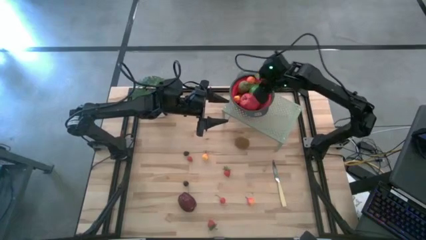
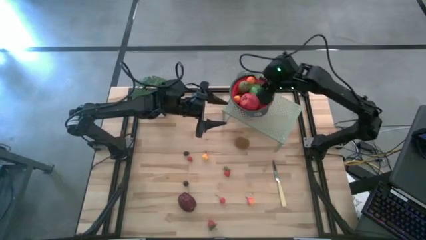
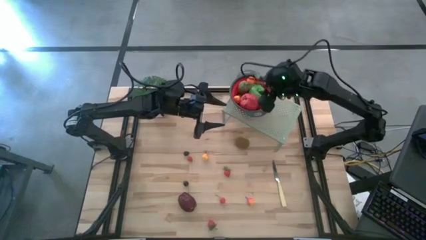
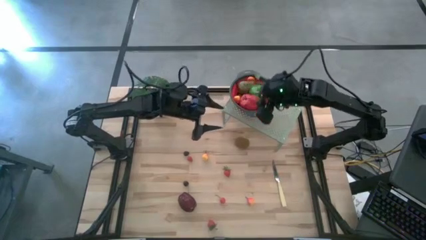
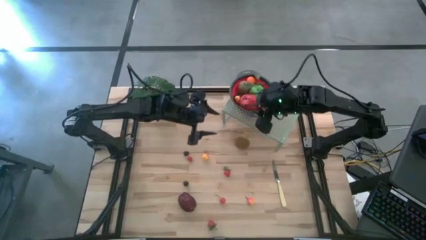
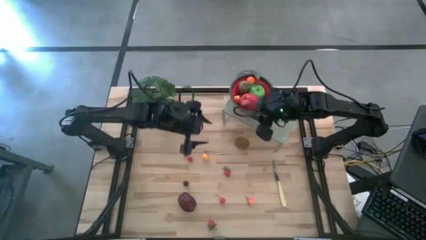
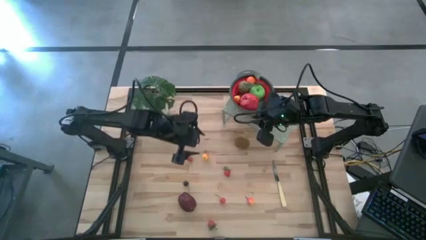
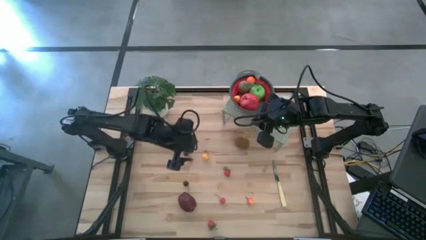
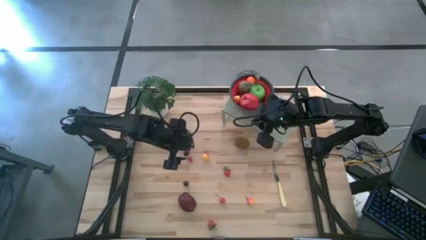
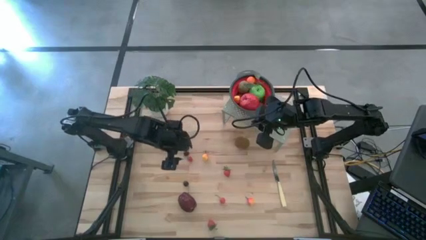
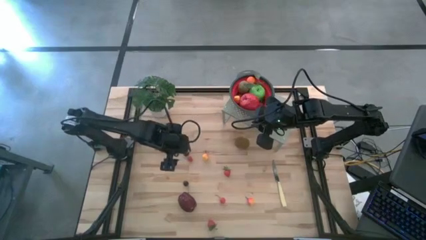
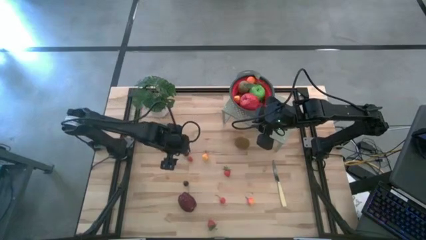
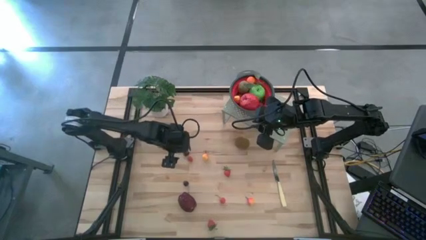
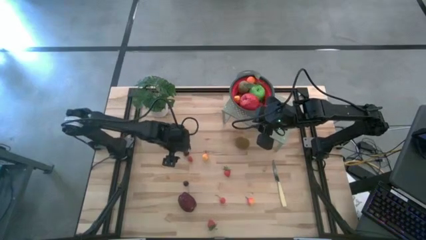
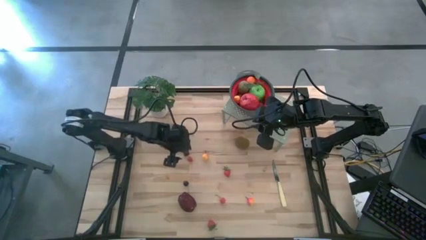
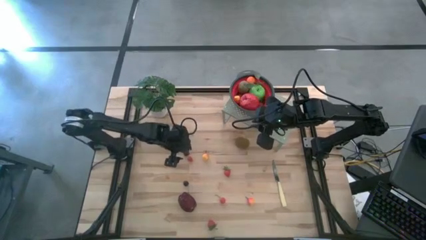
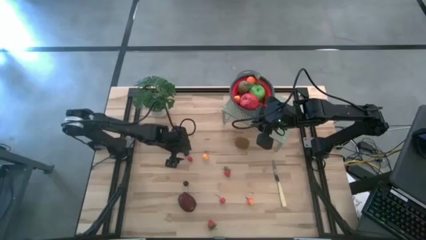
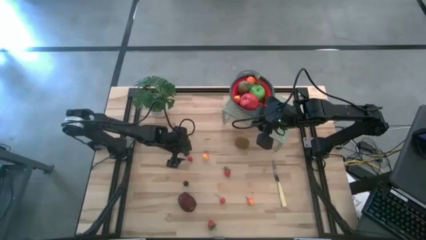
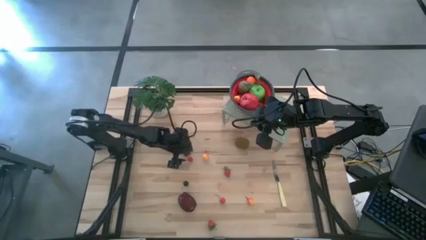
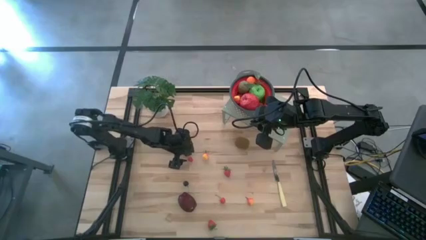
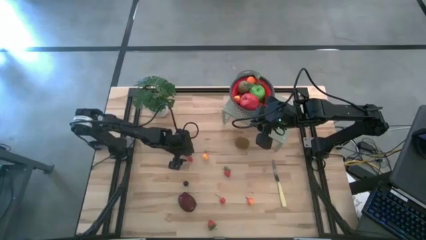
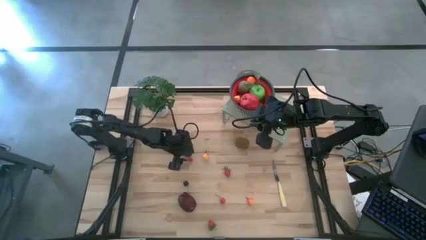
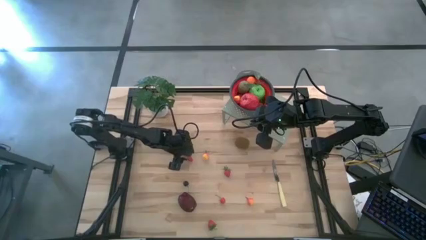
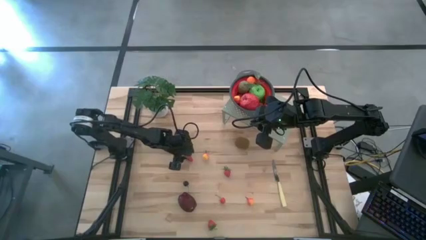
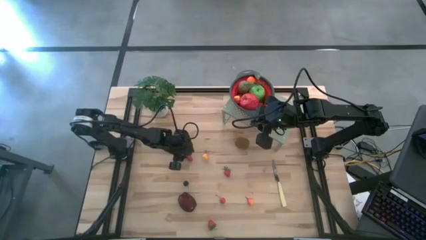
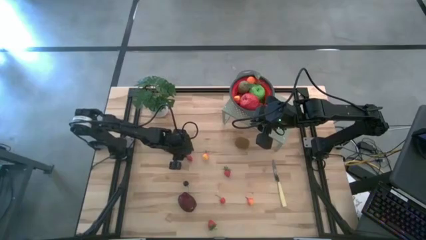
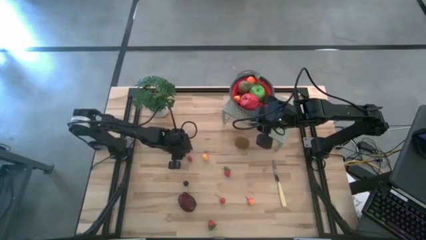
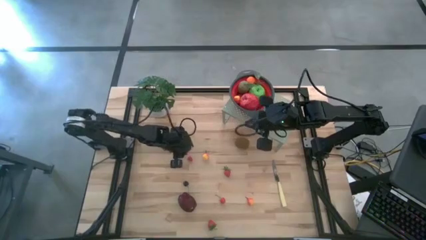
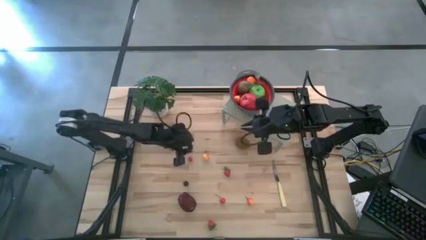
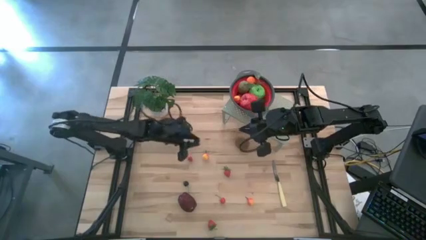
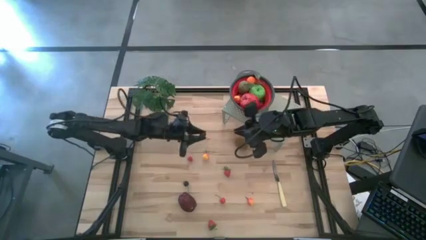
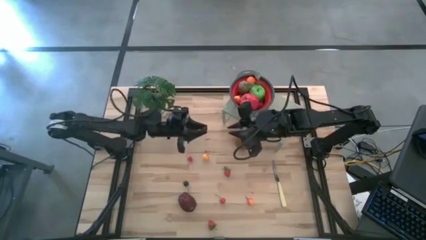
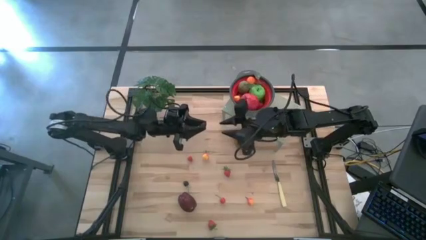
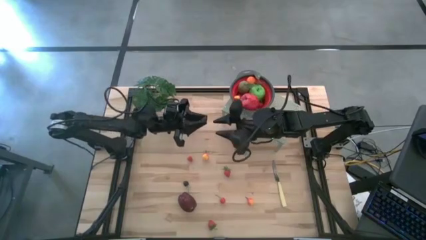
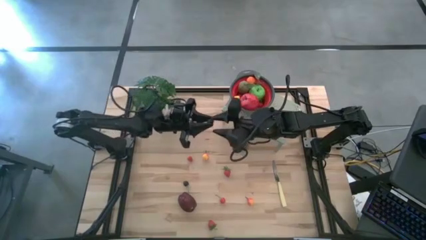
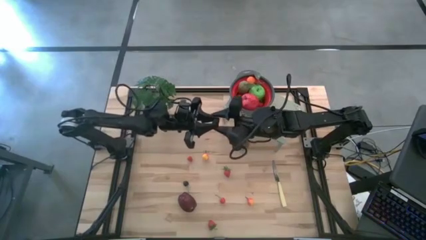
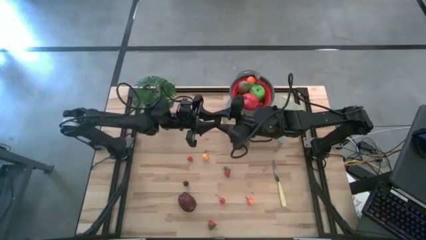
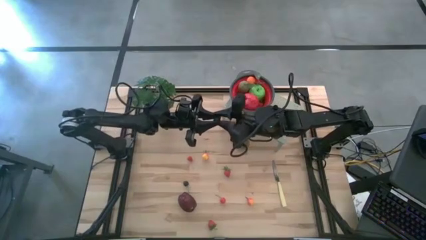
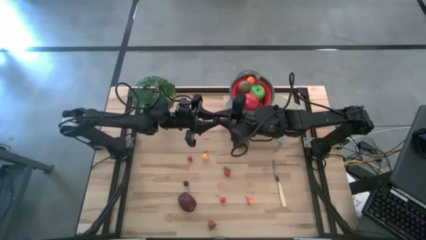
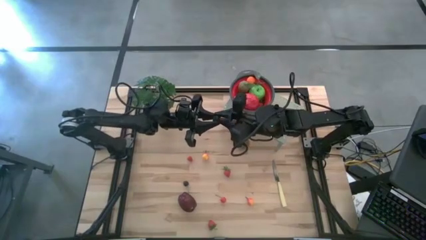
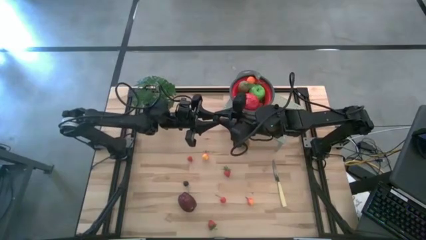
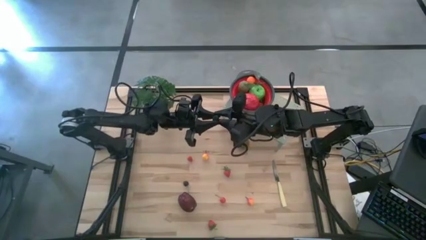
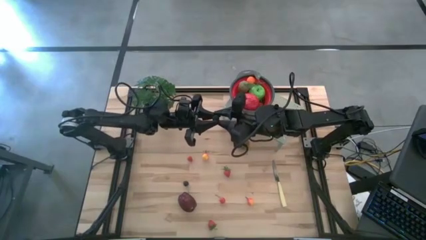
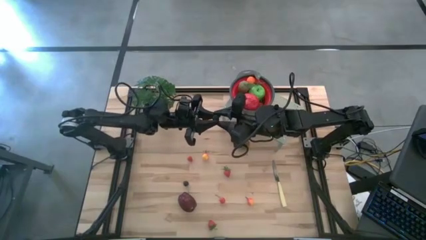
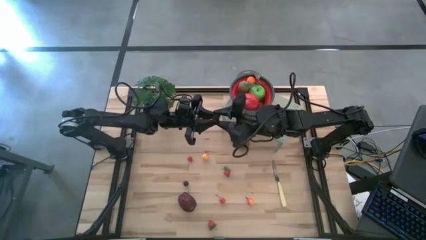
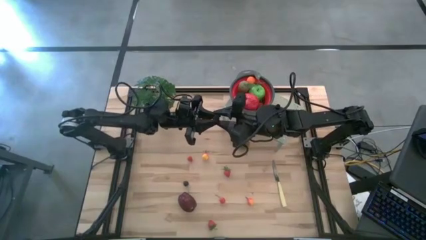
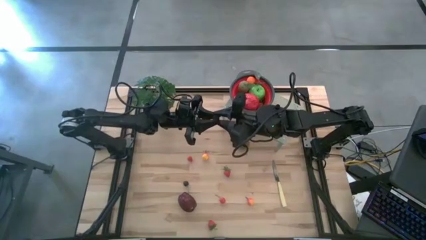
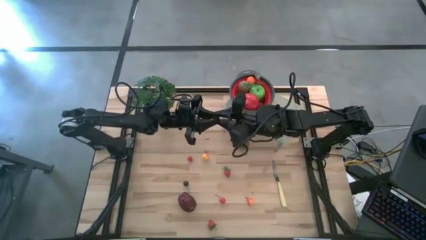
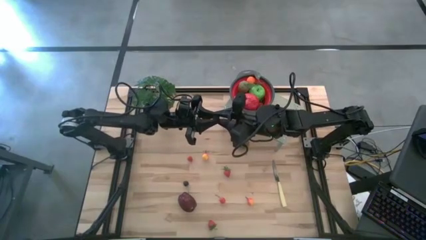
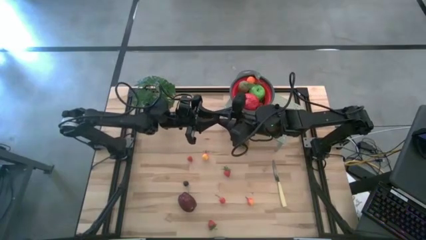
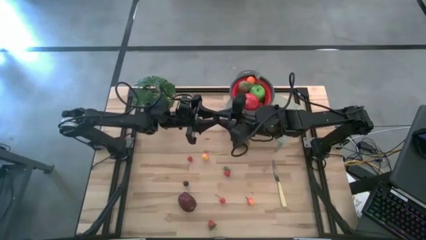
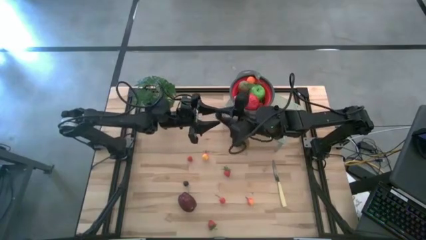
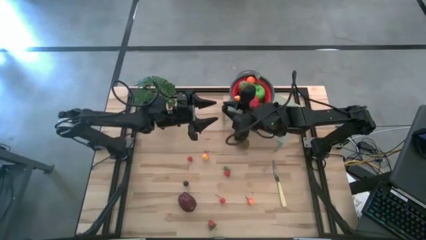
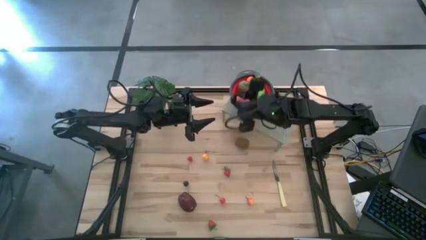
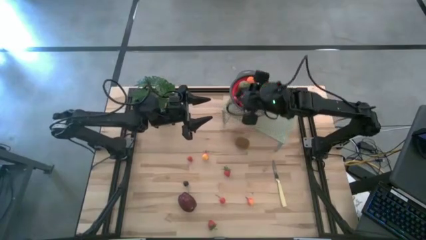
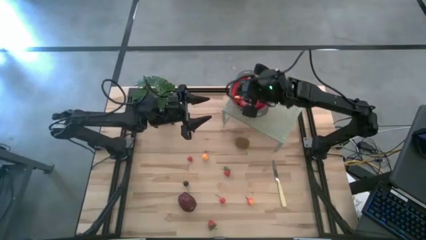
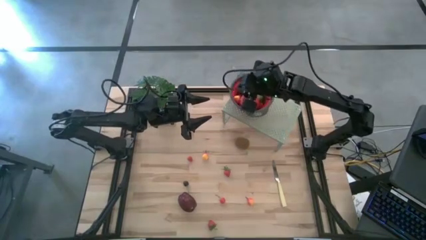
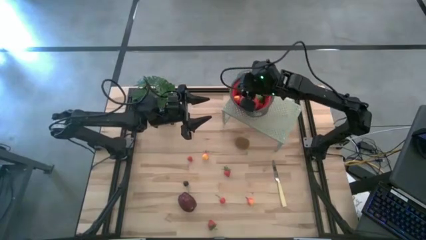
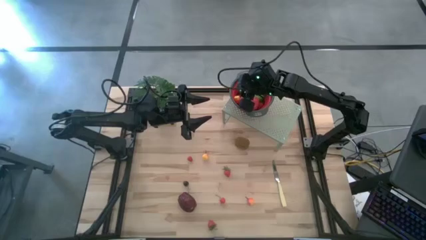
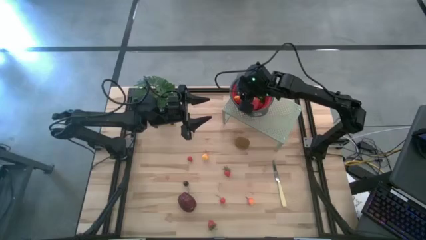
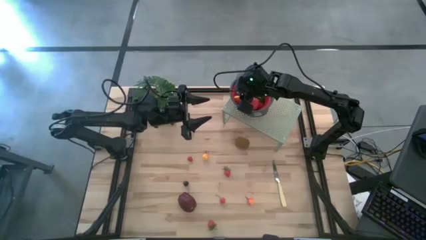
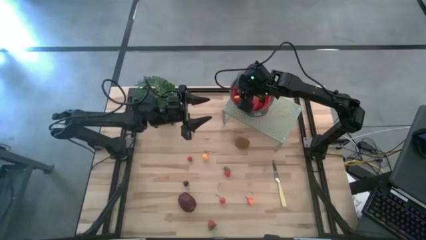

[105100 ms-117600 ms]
Task: Pick & Place Fruit
Put the dark purple blackberry into the red strainer bowl

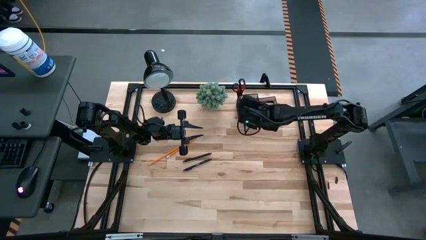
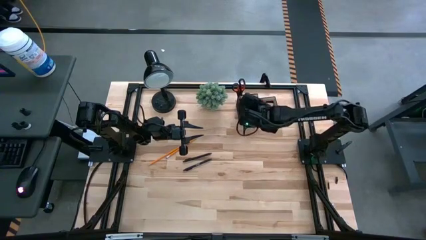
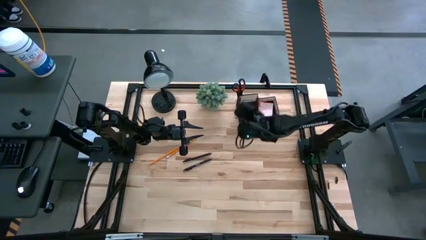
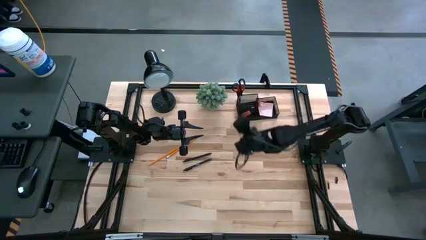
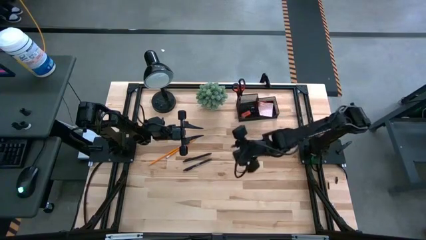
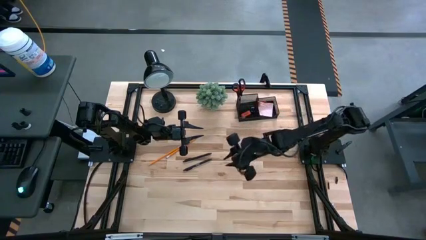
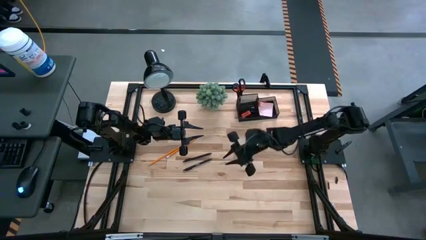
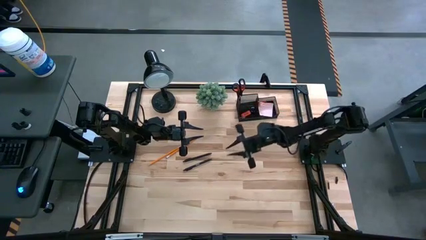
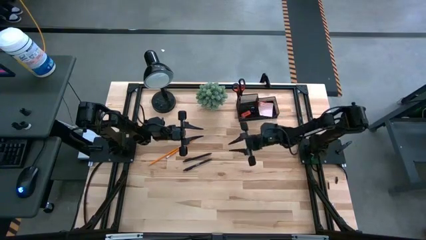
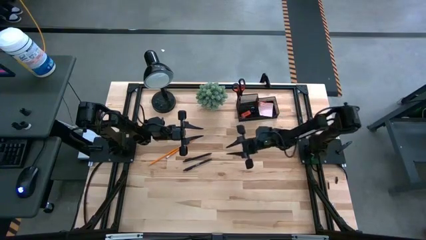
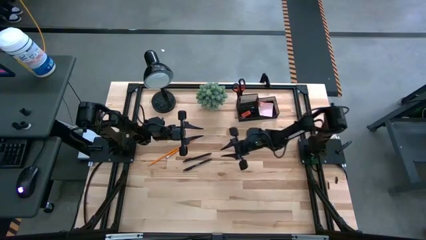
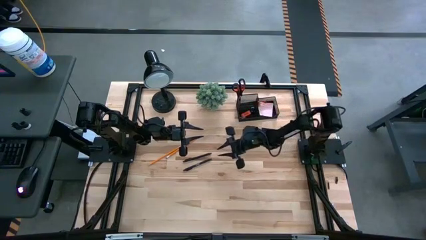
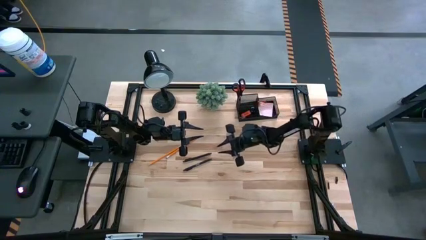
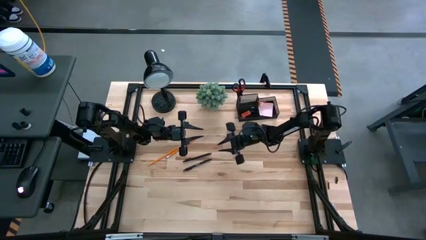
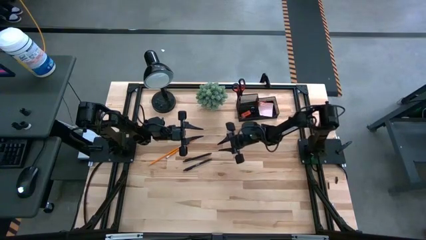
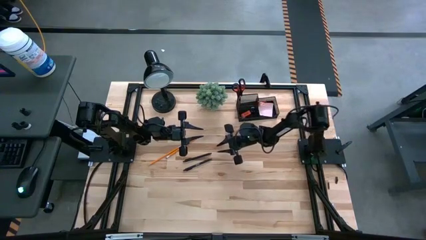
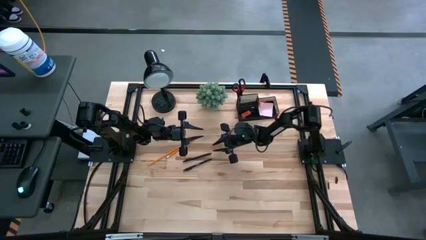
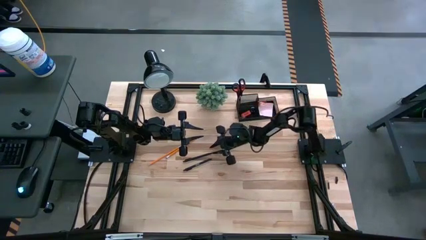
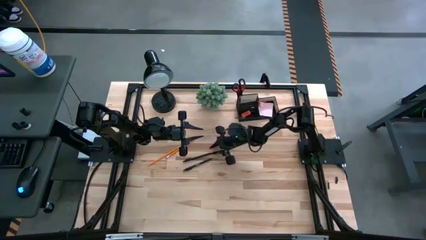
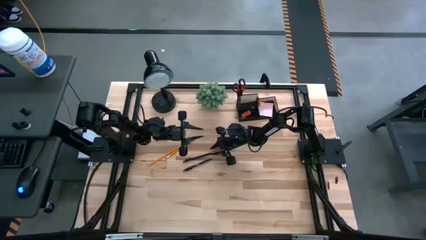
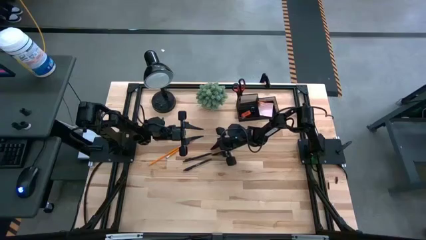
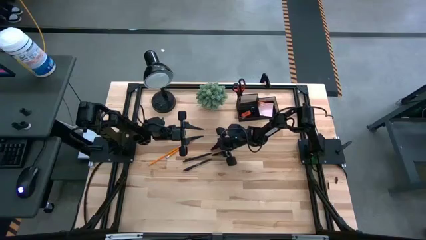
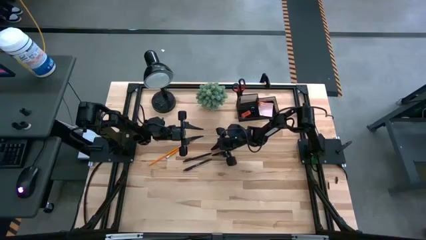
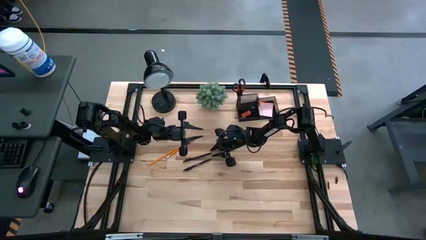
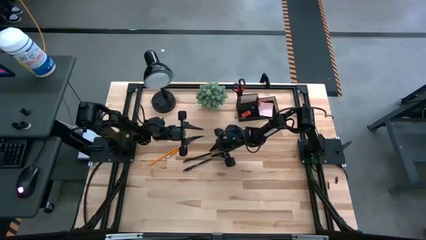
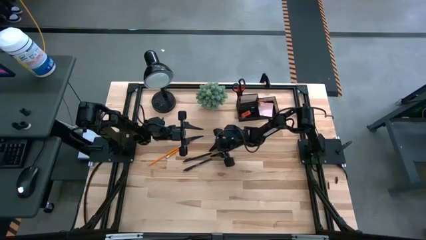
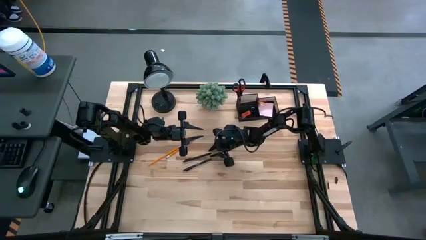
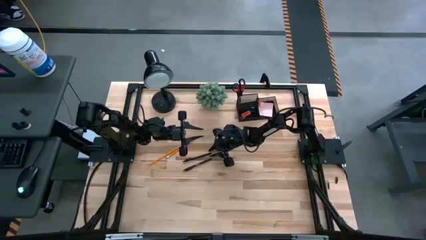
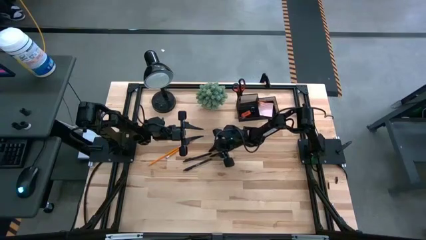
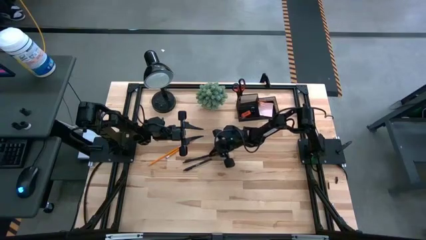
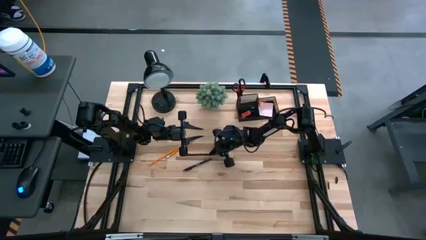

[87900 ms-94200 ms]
Task: Pick and place office supplies into organizer
Put the top black pen into the black desk organizer
